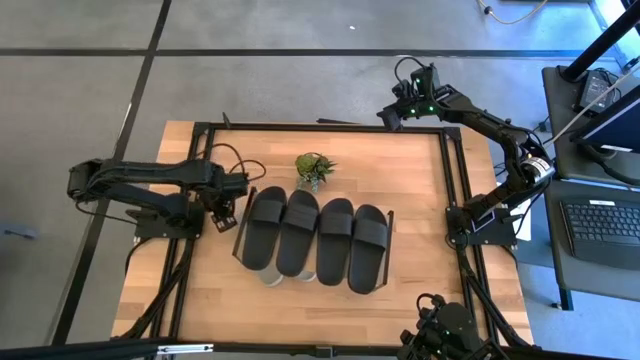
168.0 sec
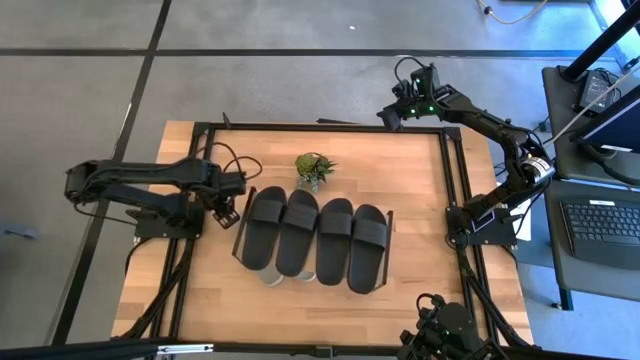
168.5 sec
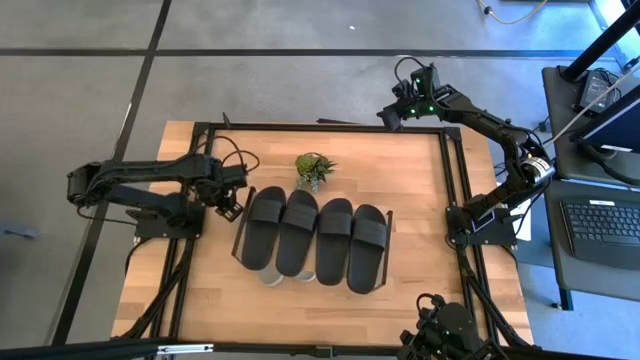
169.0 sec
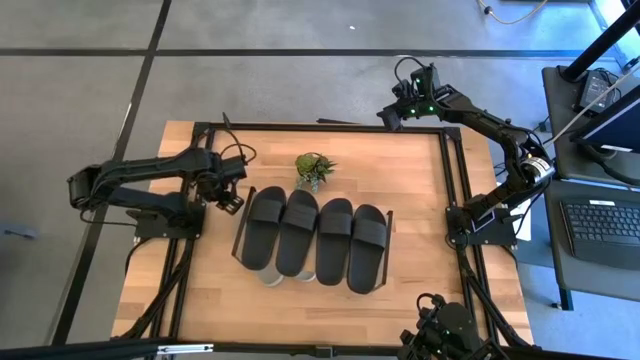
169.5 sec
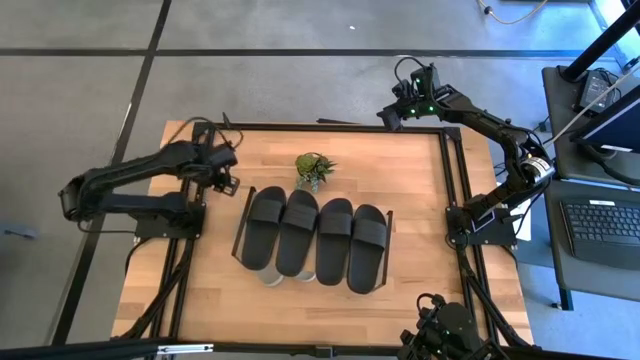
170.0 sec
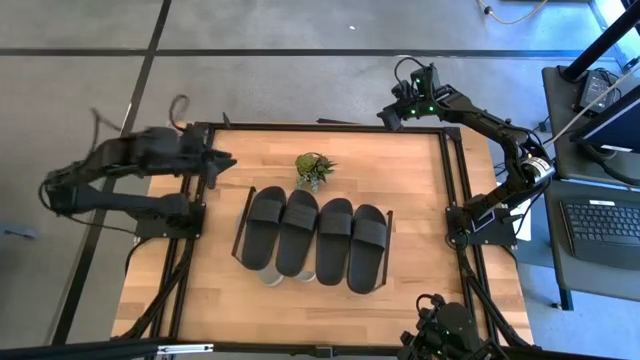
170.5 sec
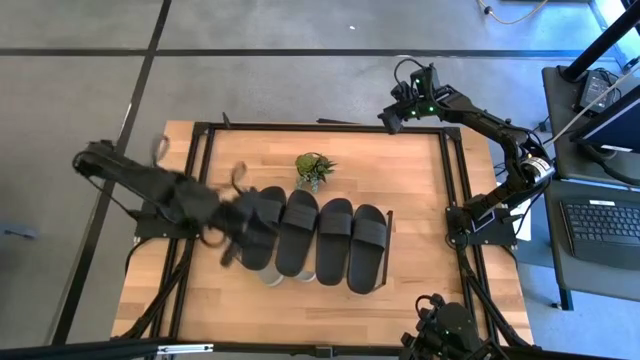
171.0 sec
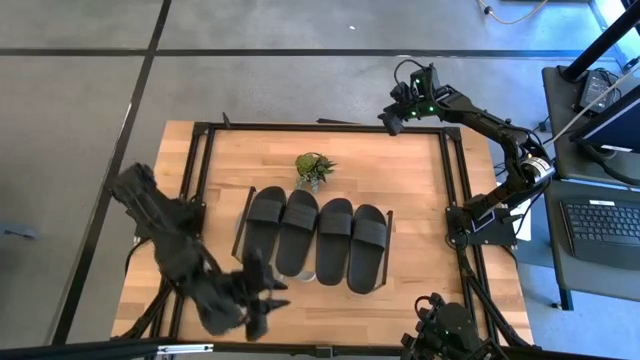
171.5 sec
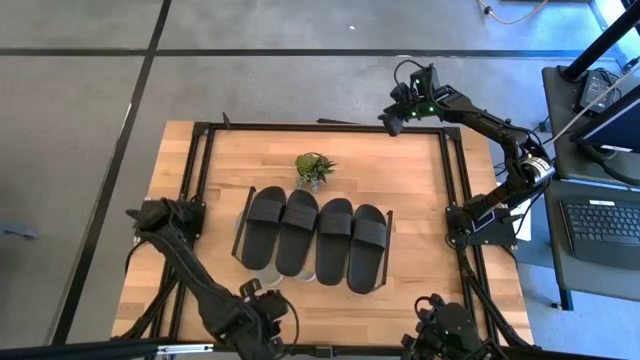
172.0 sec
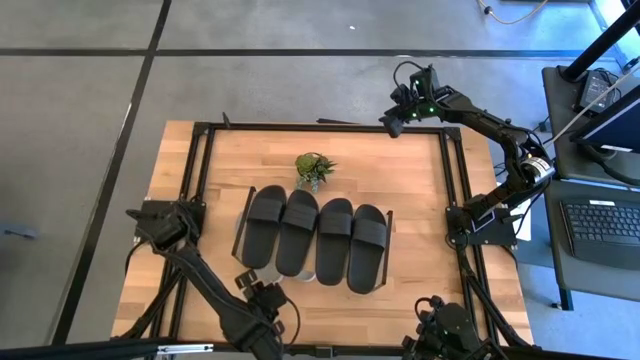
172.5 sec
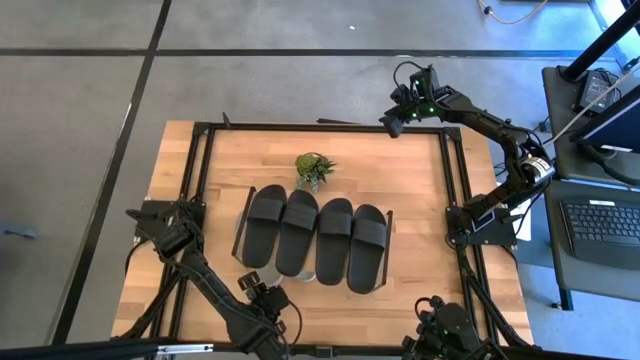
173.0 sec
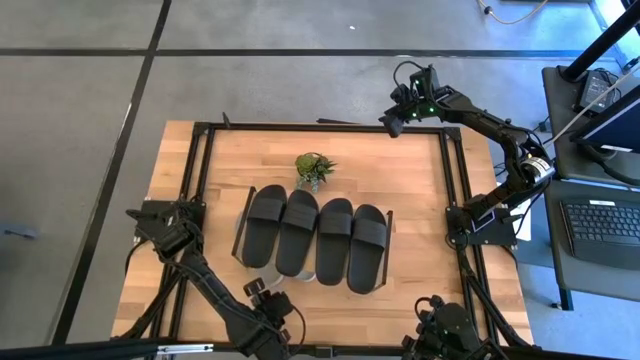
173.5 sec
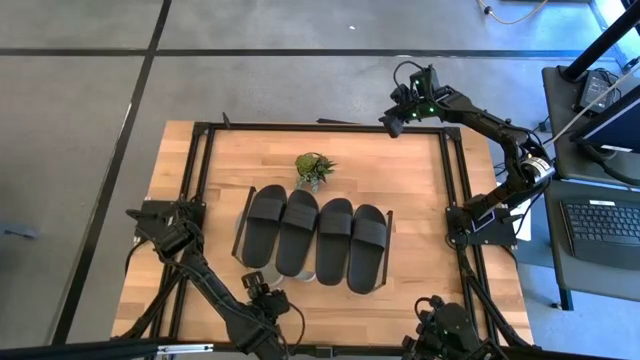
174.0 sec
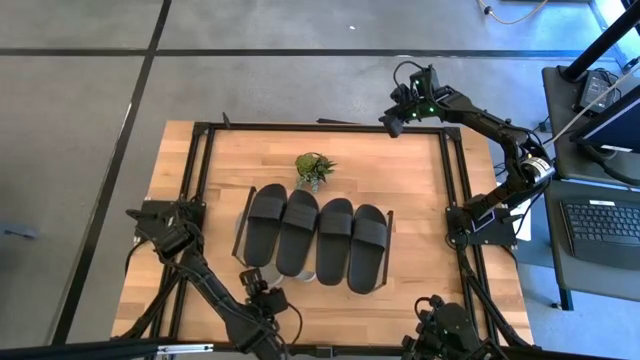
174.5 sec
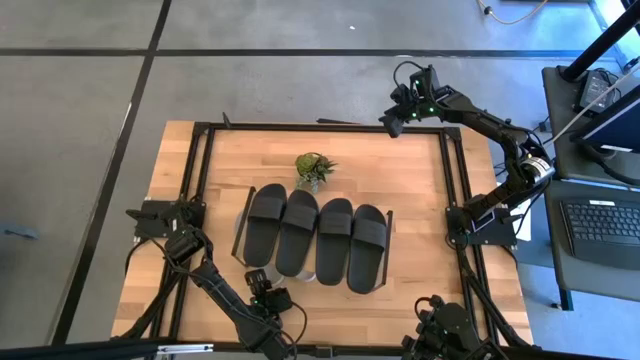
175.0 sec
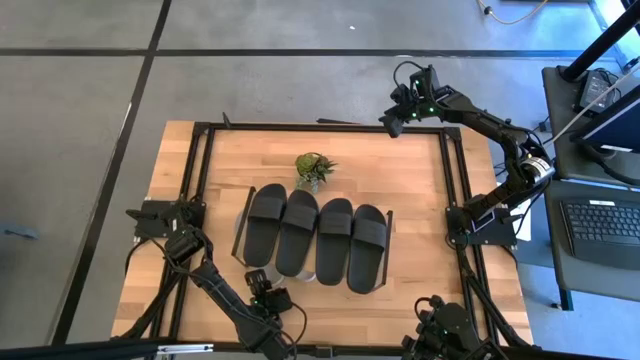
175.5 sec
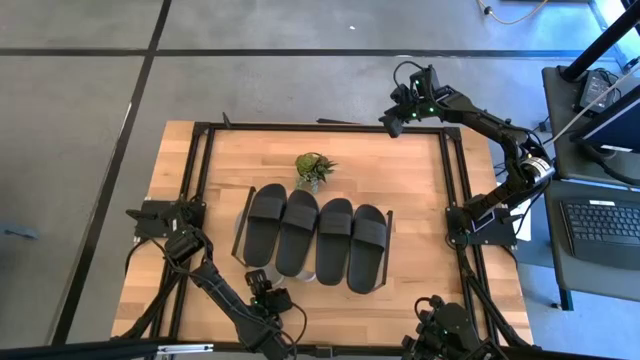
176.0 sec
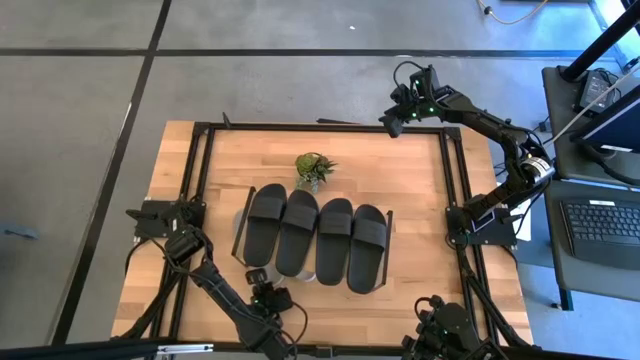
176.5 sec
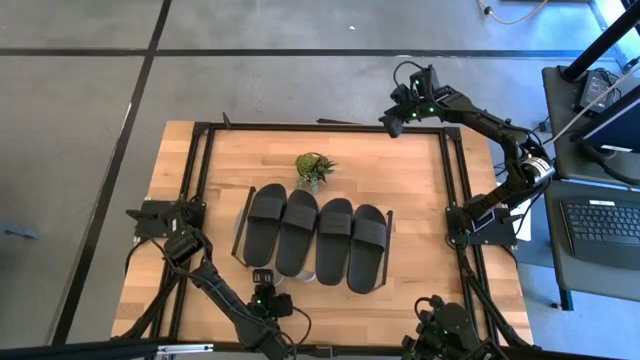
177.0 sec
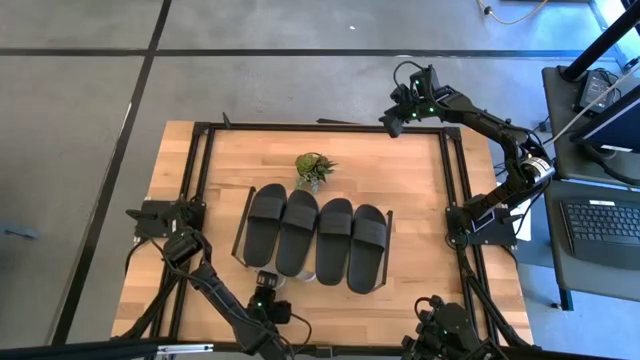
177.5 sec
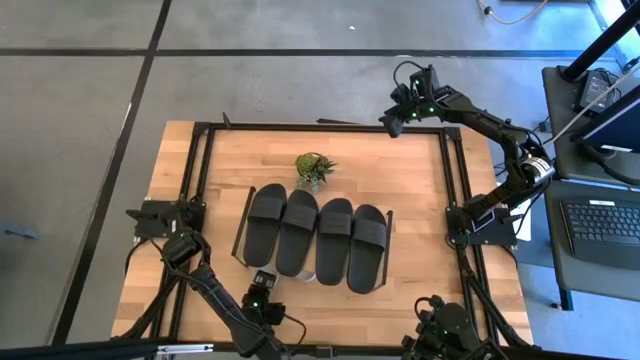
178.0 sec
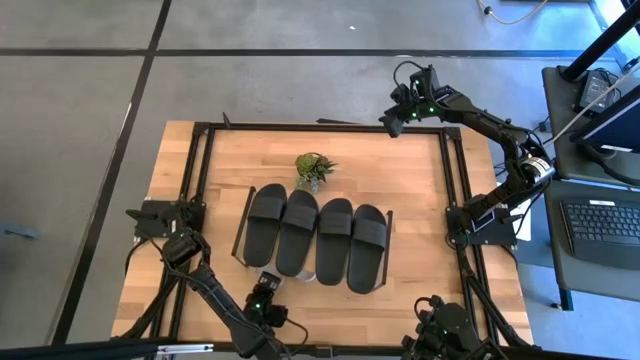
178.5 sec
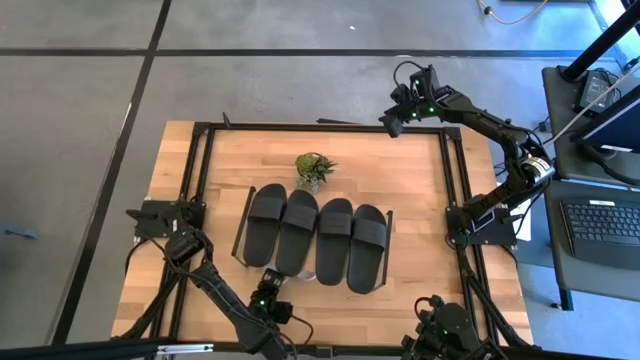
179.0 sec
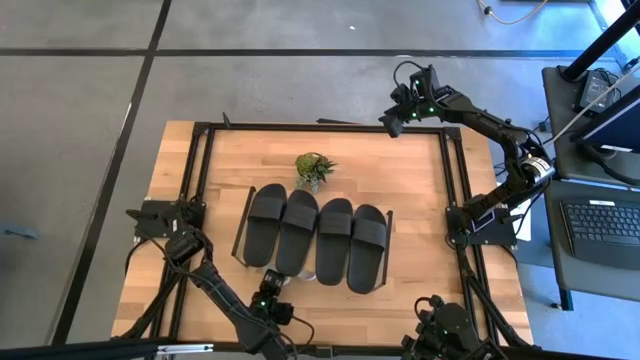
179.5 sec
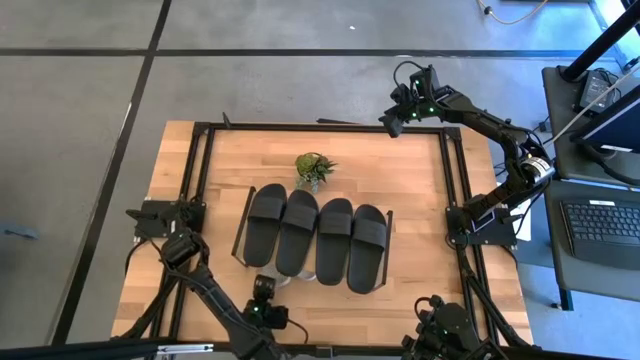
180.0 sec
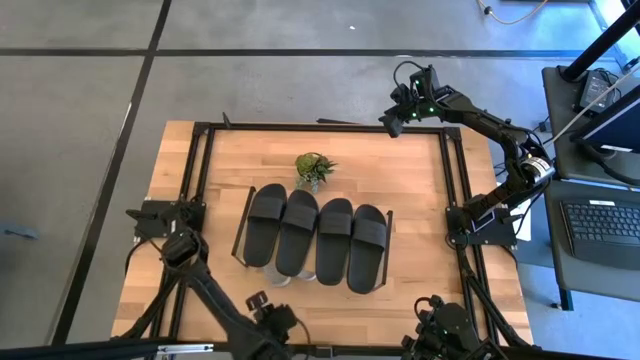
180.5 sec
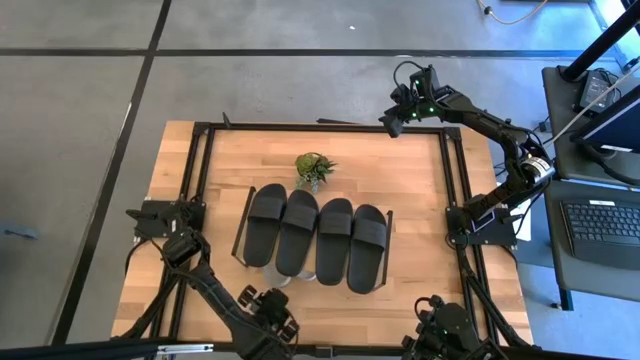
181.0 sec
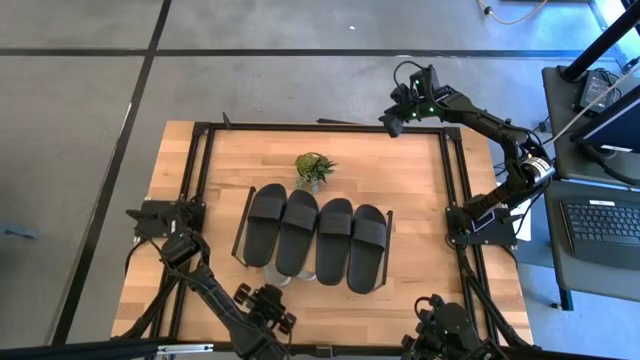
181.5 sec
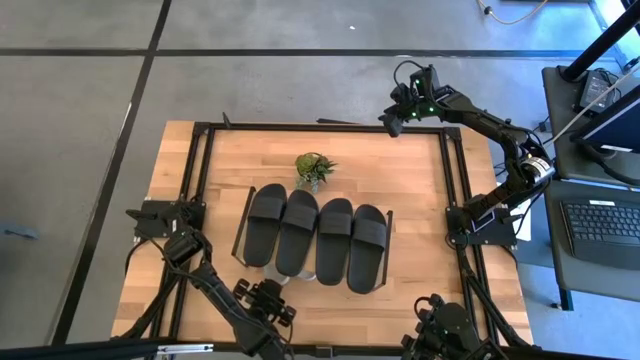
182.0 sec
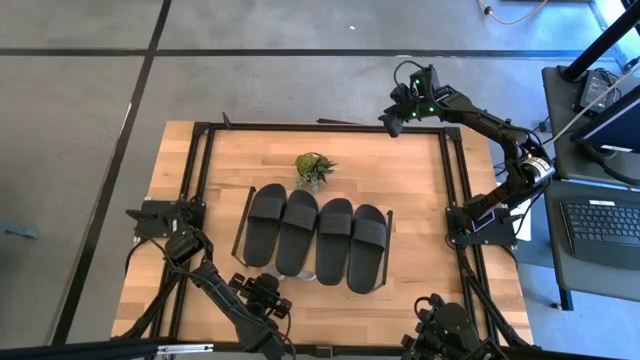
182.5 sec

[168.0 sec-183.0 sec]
Task: Pick and place slides into the shelf
Adjust the white slide under the shelf

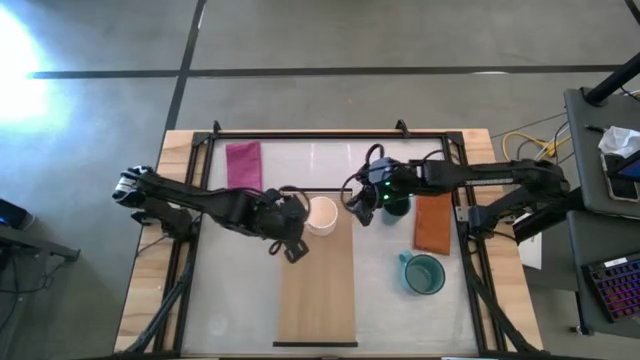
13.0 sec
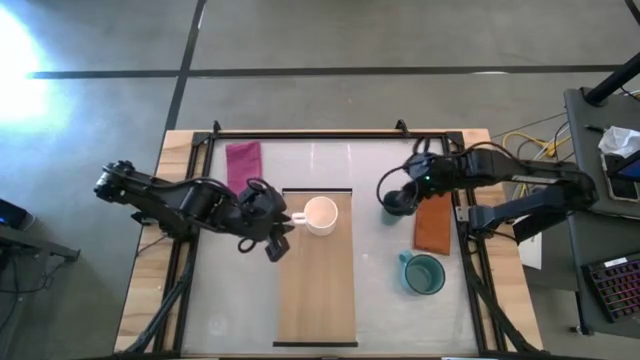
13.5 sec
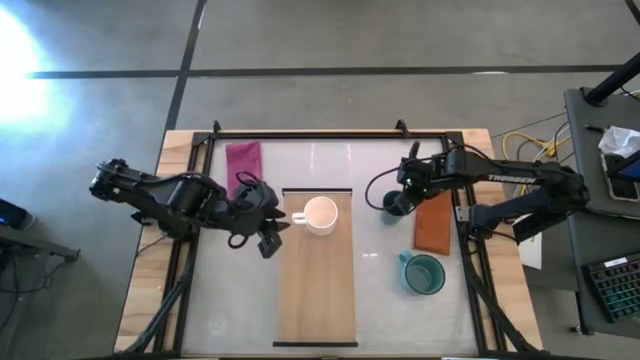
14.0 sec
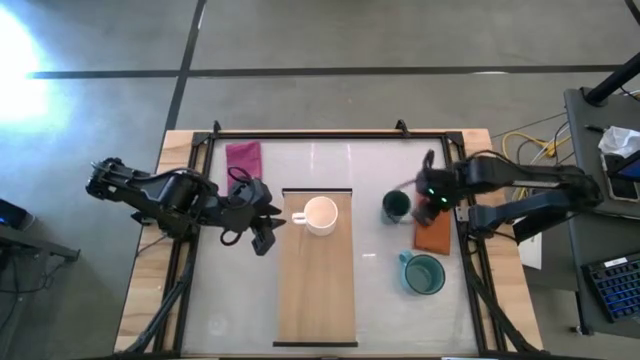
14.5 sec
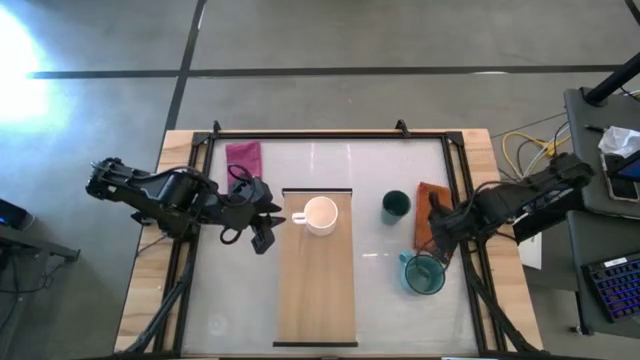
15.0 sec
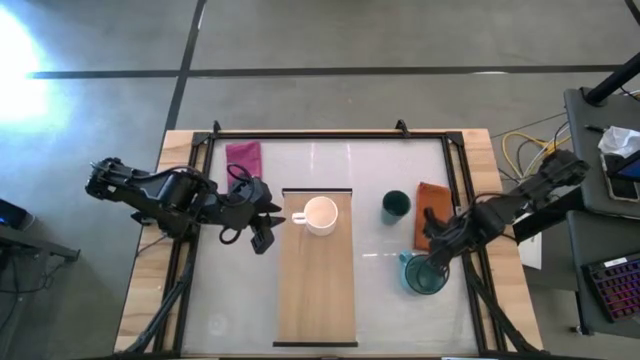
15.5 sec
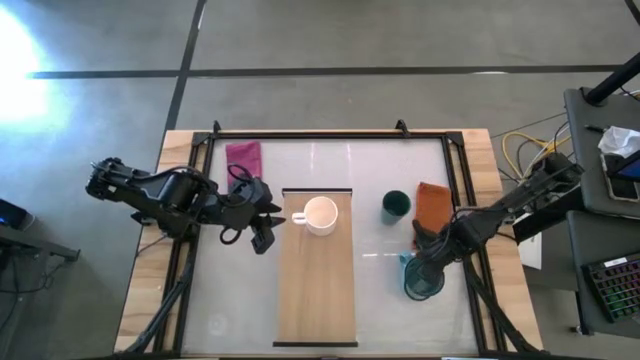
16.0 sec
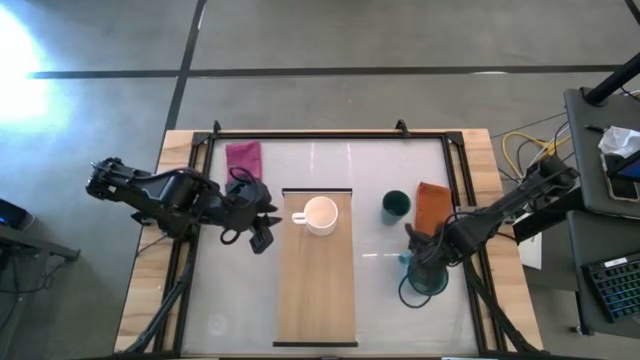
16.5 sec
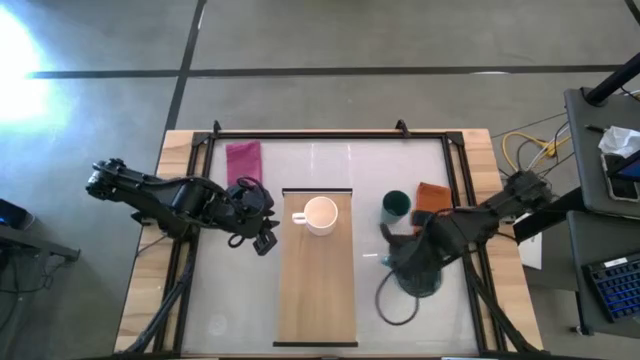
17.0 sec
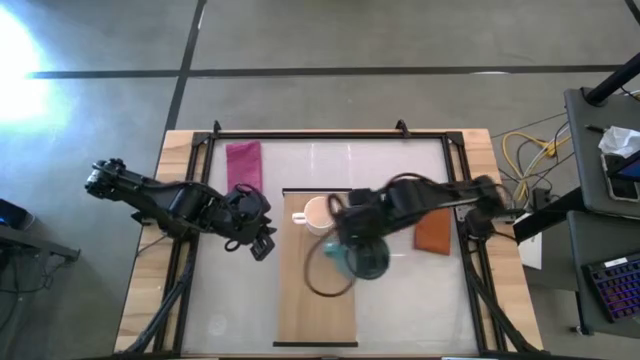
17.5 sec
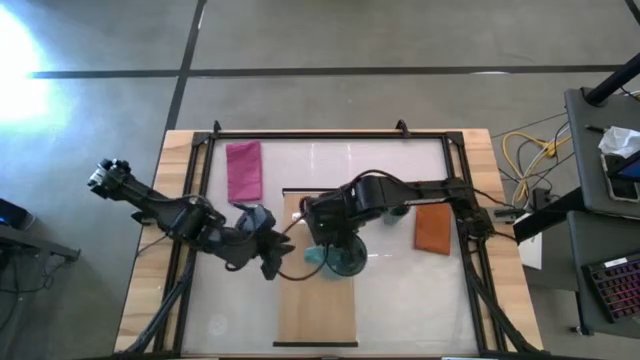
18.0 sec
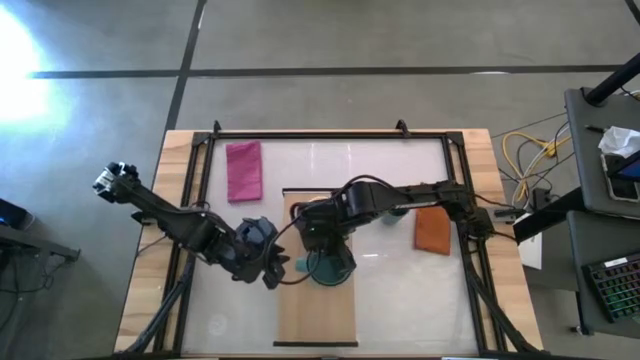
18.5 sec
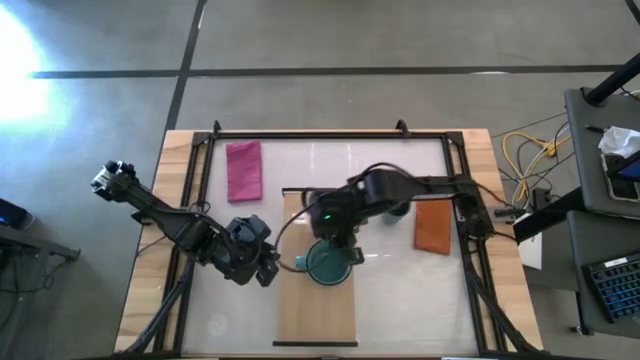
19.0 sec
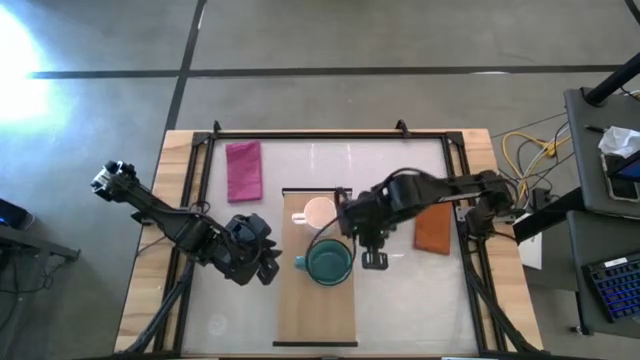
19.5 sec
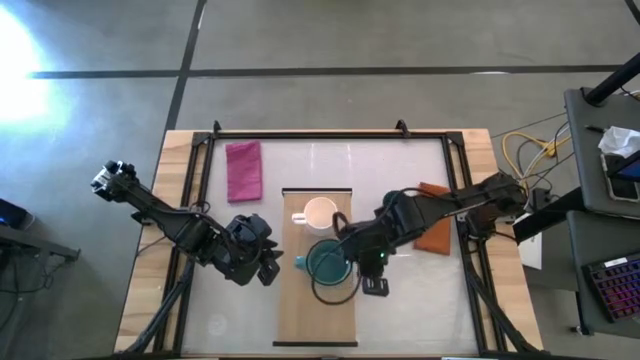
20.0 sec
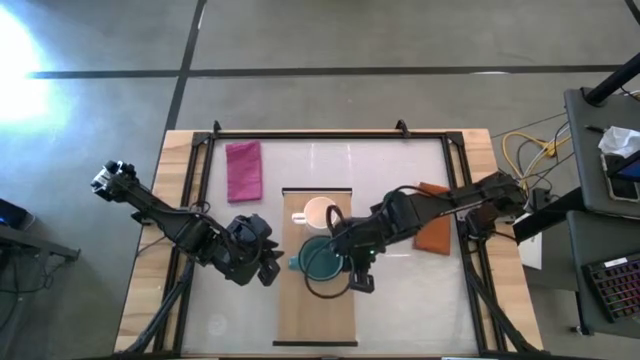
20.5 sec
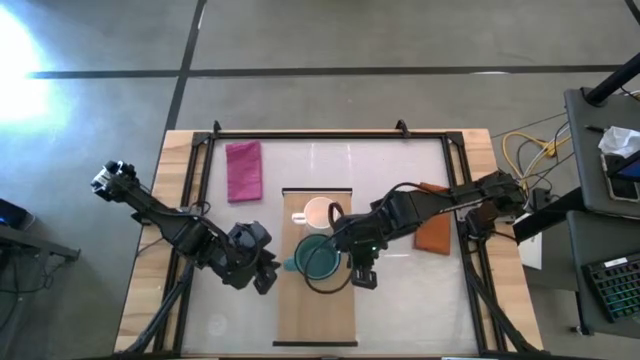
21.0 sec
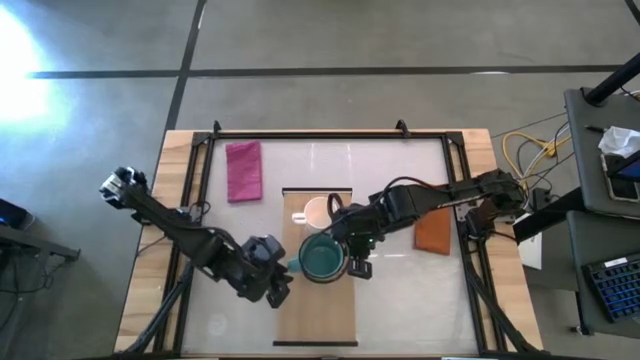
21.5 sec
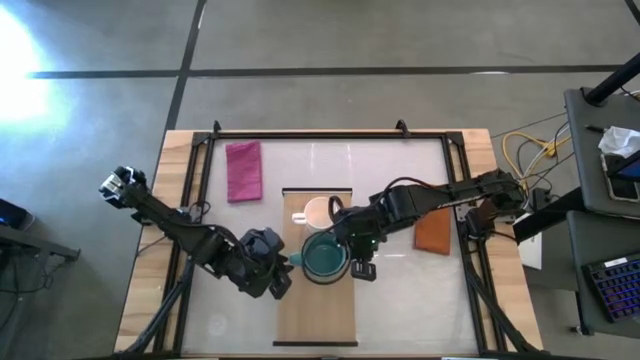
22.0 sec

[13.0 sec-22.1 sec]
Task: Stack small to large cups/mugs on shelf
Put the light blue mug on the shelf
